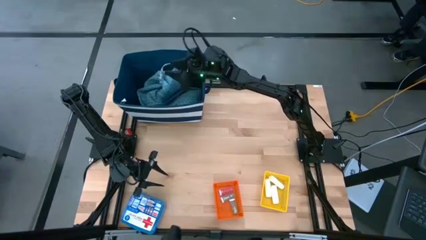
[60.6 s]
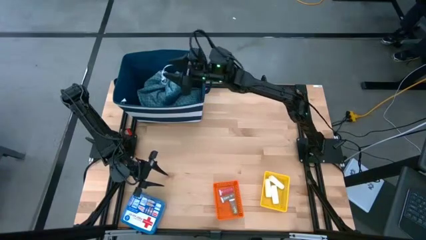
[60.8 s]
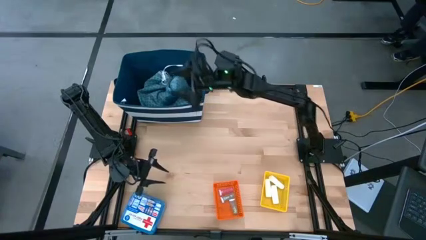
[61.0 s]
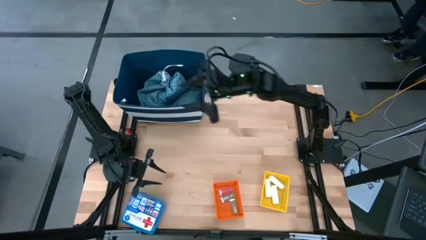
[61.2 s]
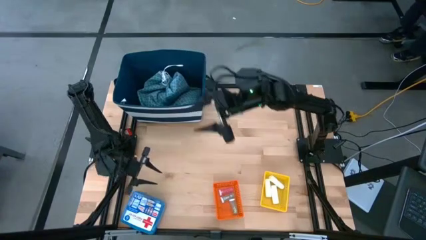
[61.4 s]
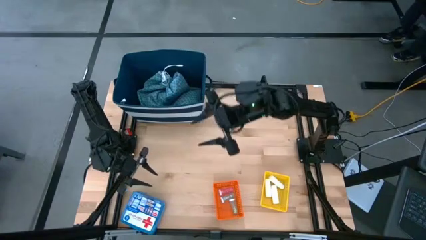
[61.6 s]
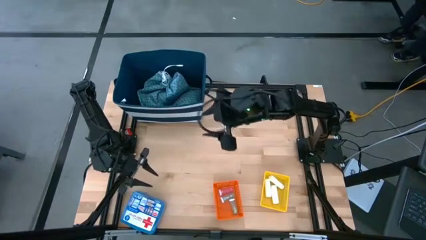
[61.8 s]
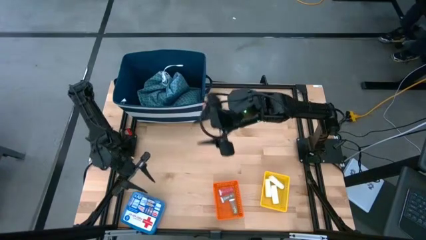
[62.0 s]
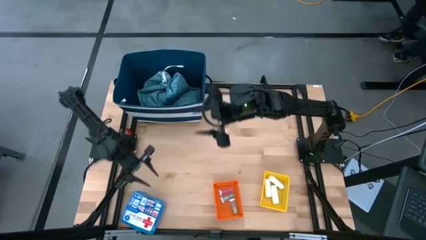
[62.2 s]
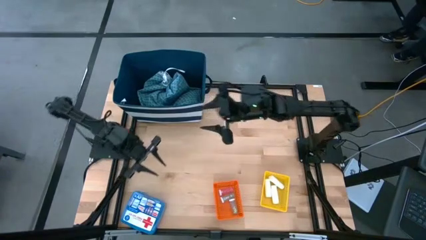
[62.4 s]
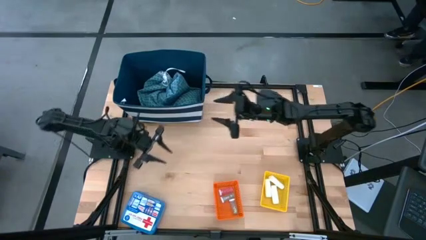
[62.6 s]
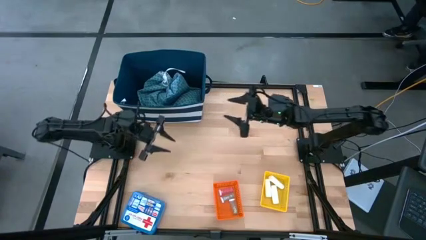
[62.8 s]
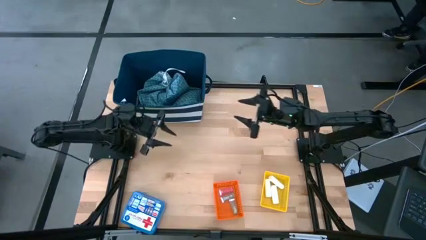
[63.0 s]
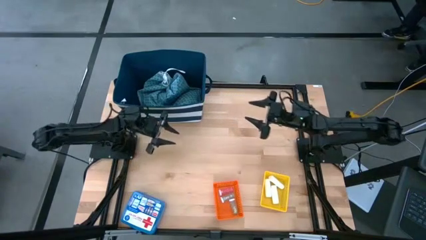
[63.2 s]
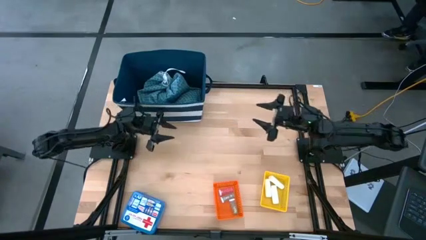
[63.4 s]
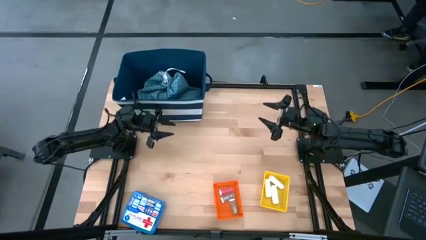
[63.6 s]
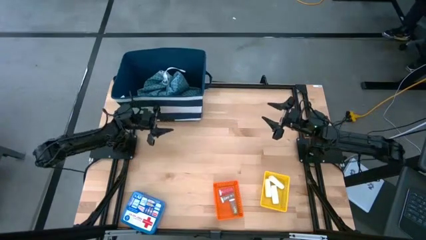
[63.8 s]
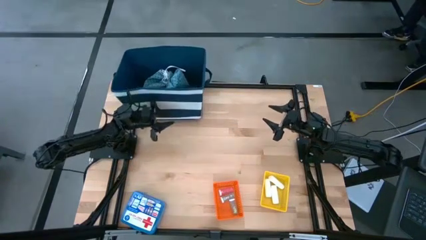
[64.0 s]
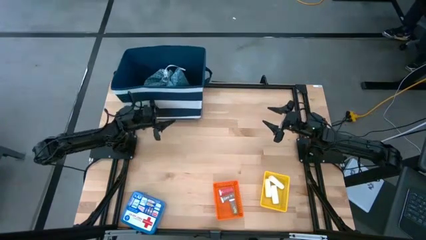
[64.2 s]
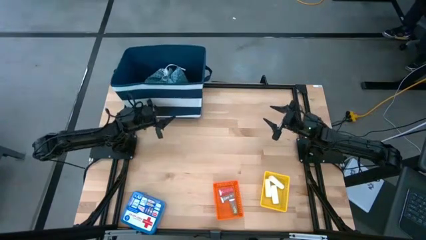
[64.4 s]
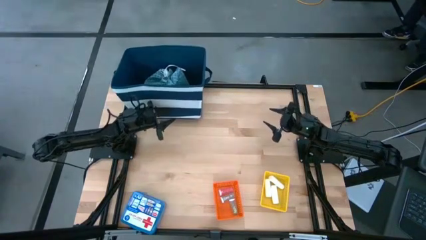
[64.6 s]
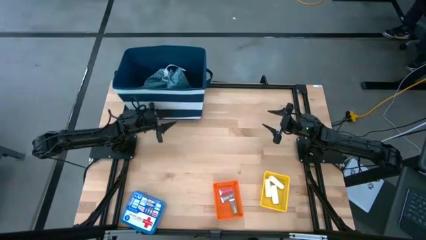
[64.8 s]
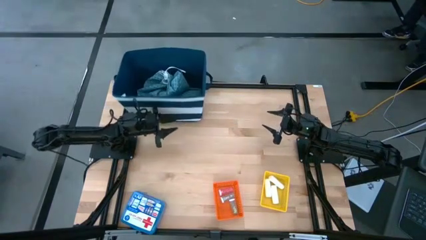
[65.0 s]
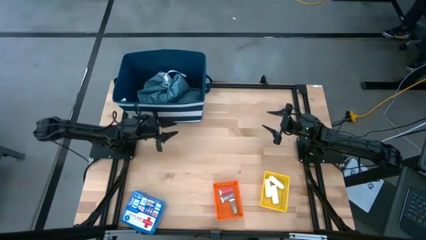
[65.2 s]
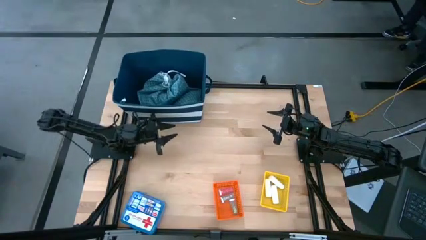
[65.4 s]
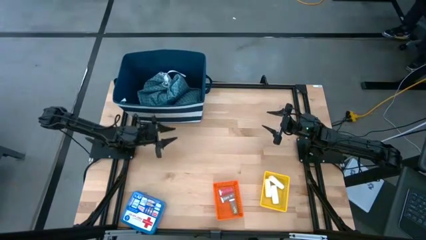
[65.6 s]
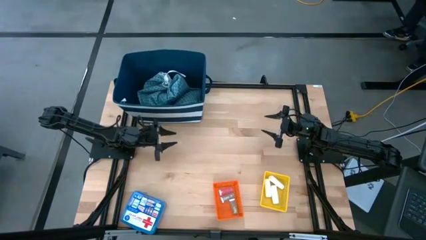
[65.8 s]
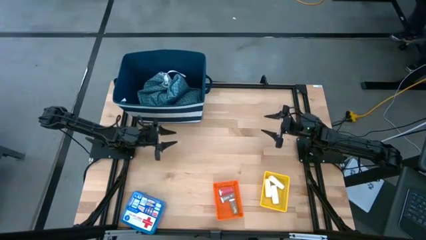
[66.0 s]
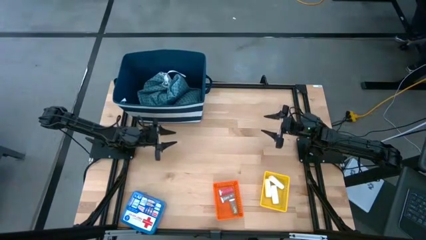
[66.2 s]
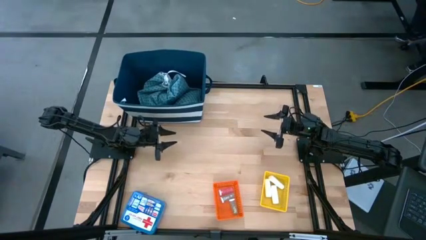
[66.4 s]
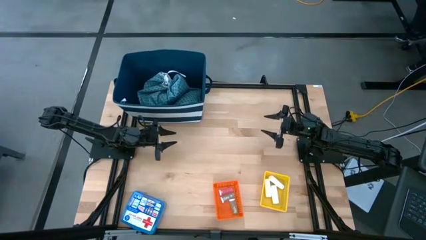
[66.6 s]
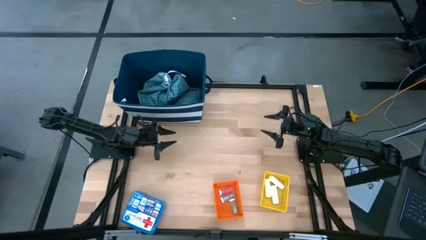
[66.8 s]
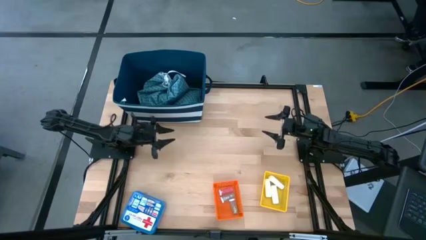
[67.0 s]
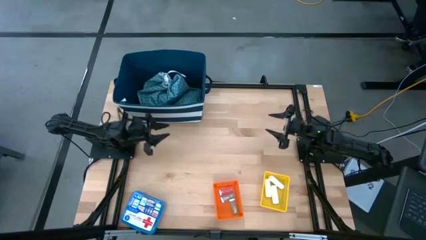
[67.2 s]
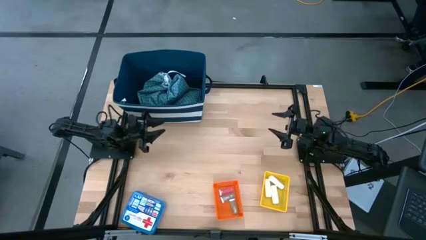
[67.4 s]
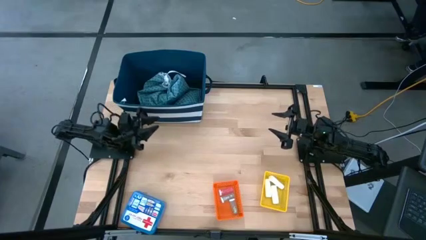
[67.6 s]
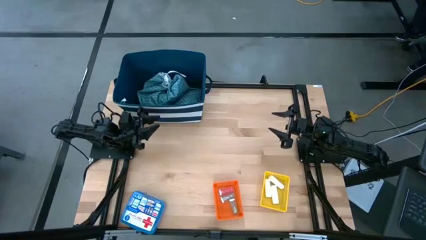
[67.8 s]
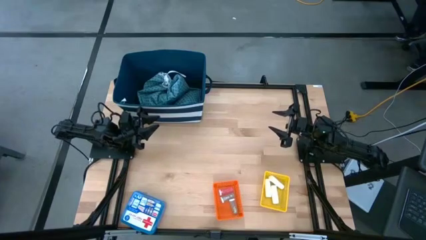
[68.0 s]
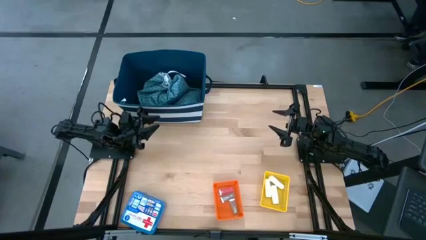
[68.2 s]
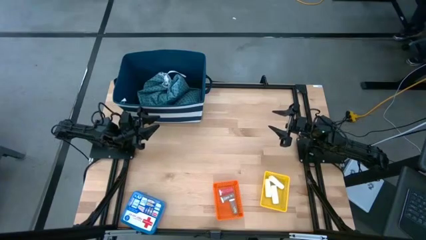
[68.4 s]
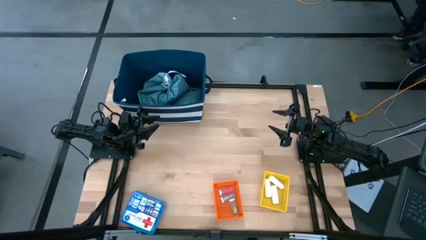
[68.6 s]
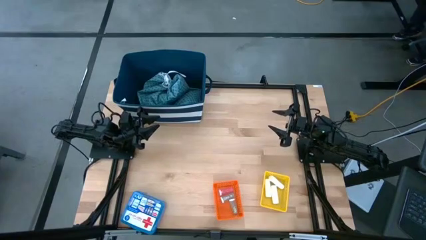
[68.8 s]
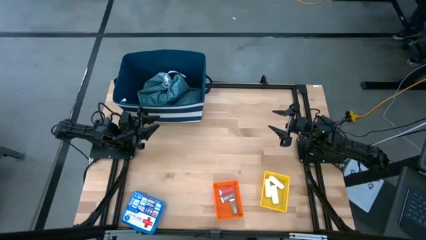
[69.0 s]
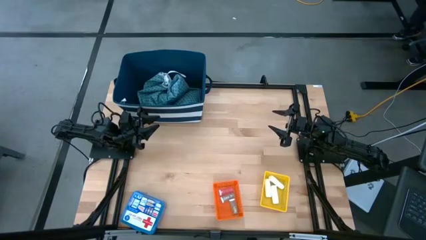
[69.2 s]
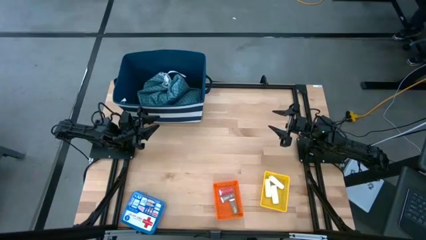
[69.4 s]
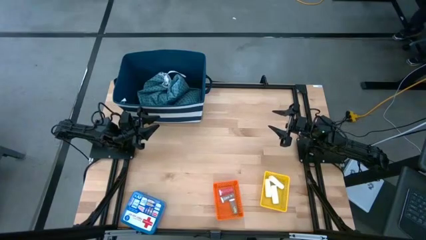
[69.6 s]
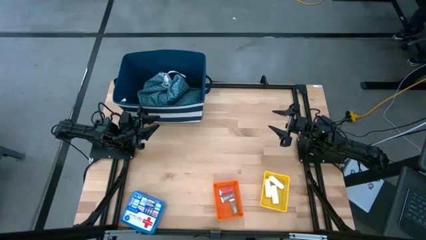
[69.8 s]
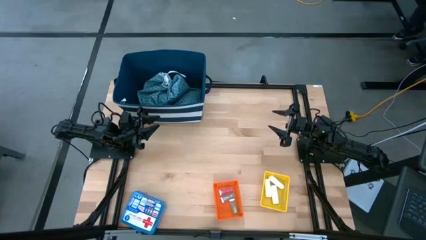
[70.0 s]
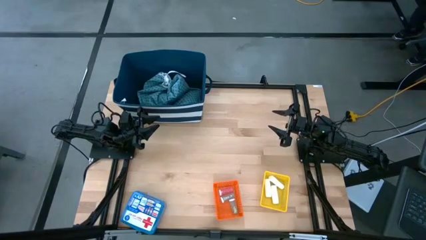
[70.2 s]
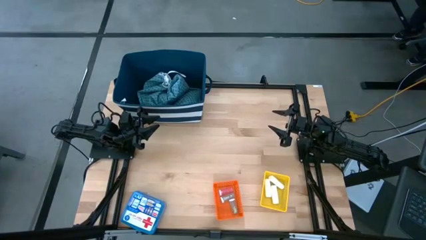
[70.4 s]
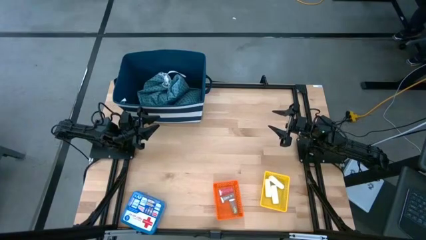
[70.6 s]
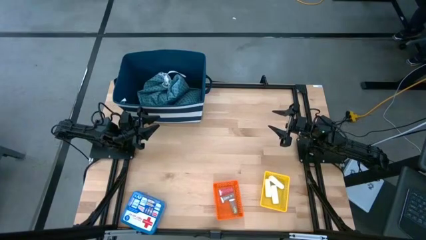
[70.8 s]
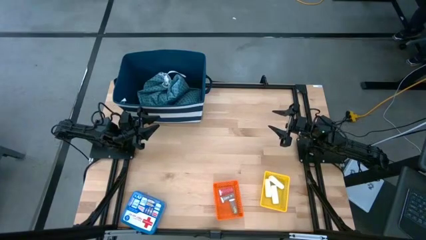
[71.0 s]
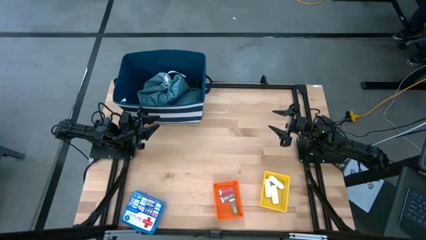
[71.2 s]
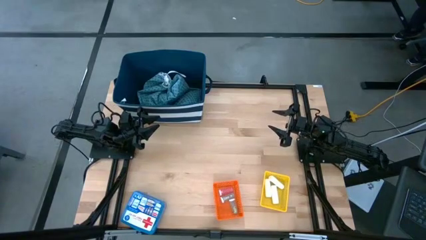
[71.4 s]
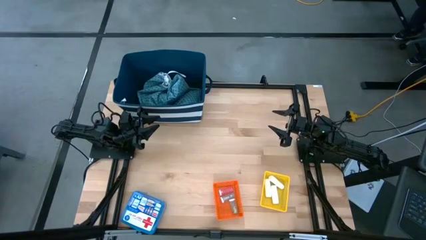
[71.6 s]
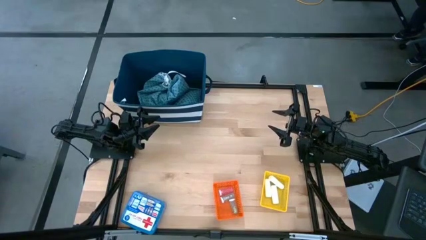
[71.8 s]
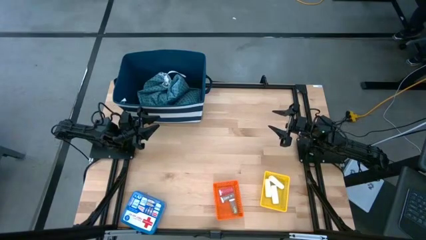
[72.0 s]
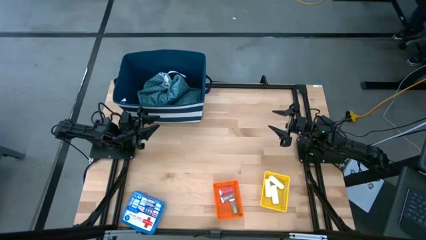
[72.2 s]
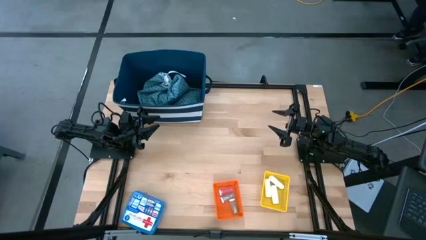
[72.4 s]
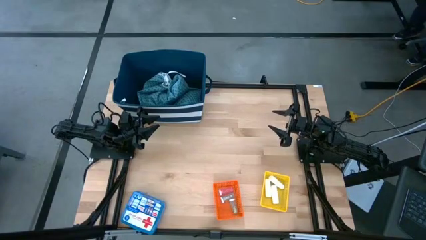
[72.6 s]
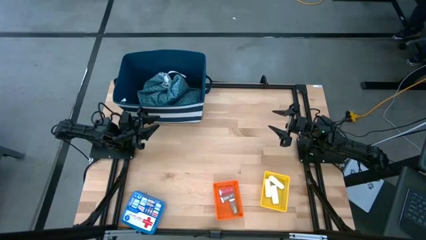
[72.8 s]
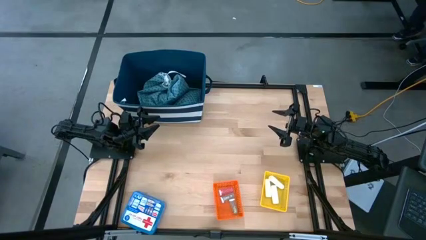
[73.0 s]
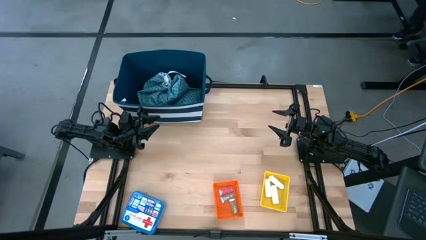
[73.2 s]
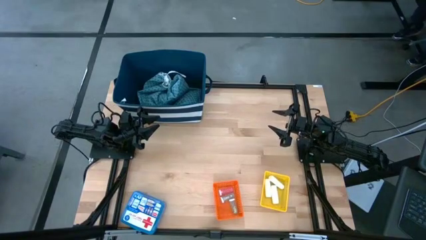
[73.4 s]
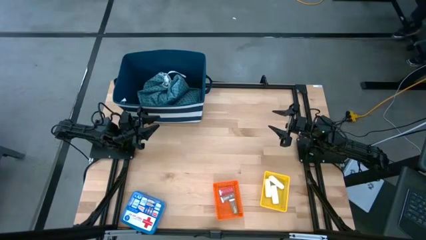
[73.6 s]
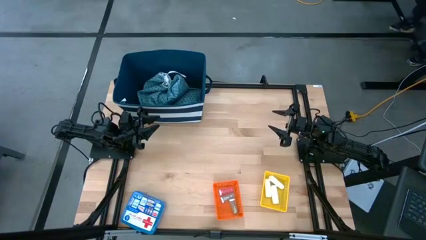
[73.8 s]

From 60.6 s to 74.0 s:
Task: Pick & Place Medicine items
Return to Home Position

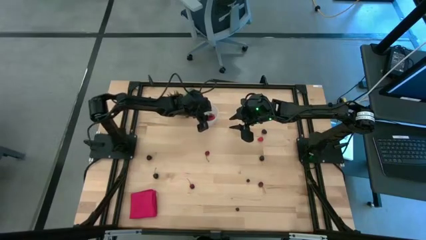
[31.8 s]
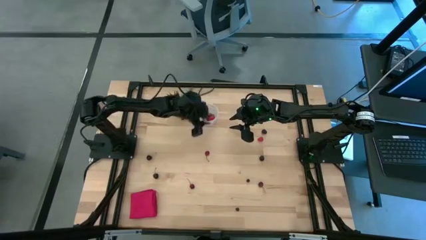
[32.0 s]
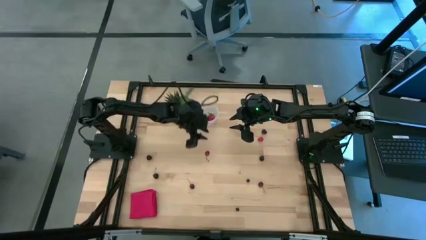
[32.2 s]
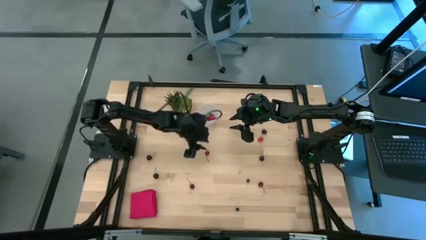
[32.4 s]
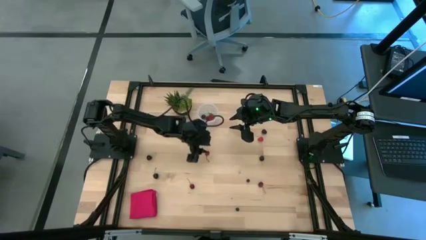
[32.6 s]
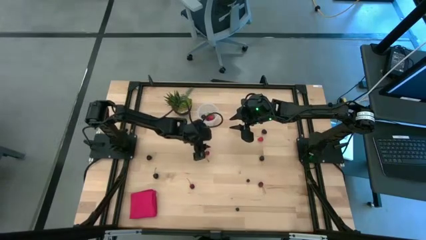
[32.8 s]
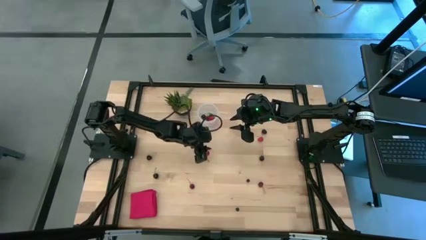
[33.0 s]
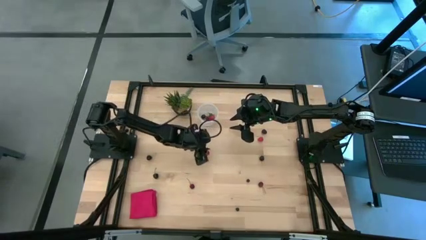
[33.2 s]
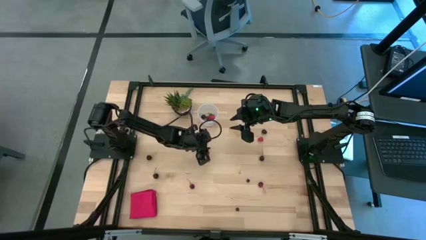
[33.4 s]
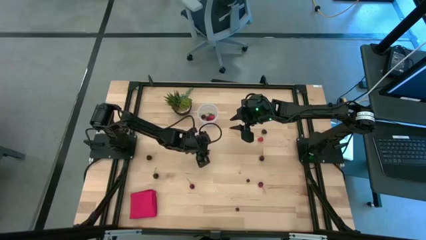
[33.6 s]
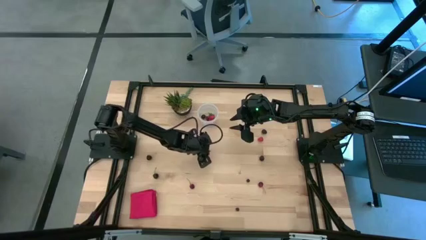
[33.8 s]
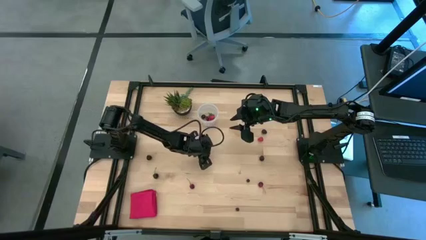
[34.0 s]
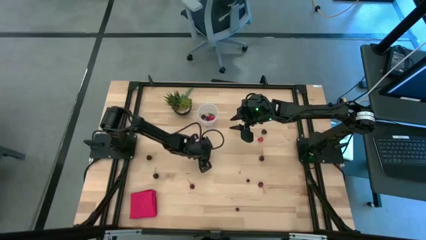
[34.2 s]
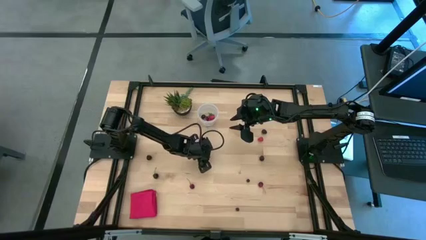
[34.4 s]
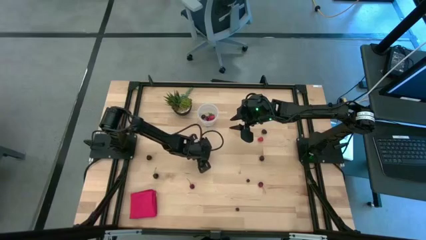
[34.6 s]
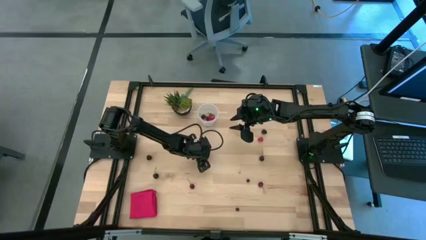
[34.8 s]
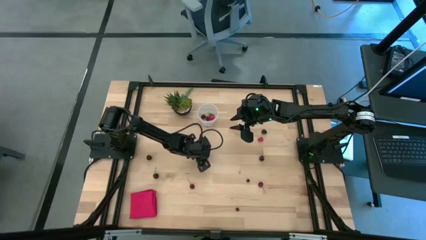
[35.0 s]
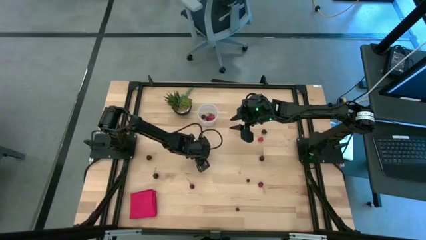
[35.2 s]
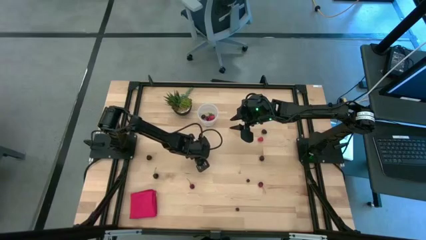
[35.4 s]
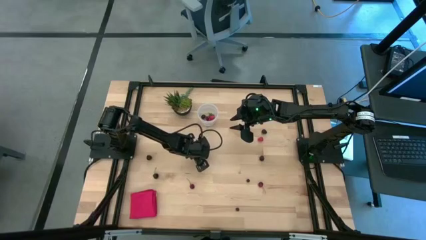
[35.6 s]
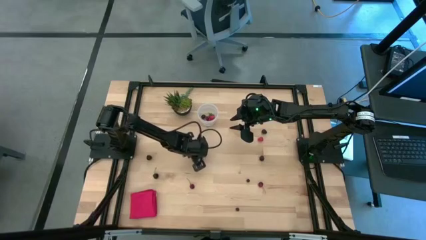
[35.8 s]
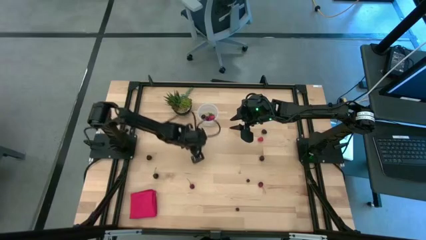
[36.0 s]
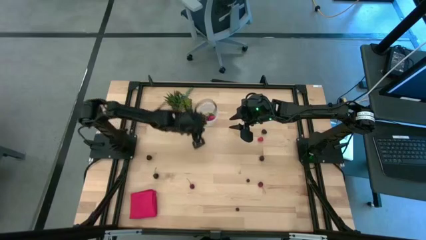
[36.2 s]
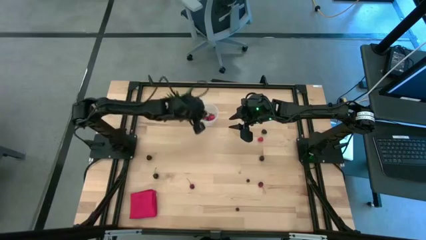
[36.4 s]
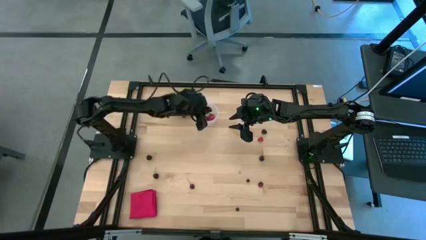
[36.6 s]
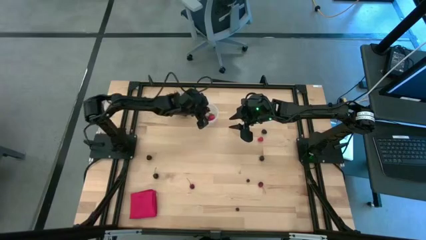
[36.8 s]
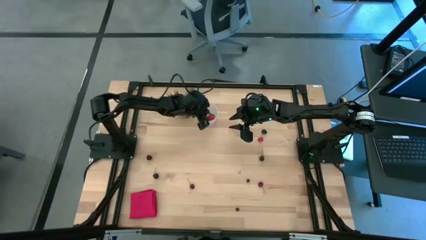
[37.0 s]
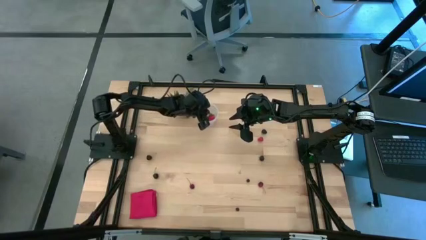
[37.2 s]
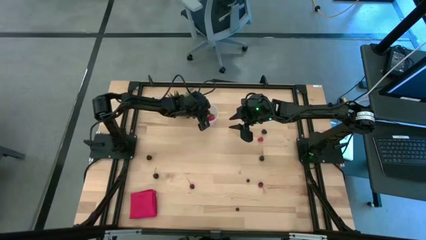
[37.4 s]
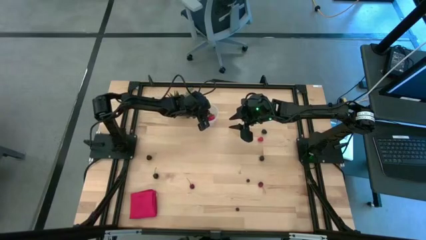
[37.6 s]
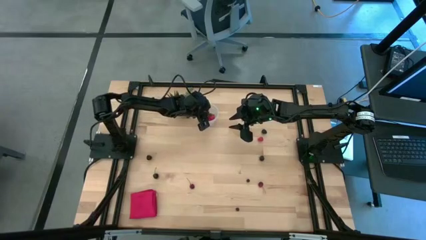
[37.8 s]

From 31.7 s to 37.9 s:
Task: Pick and placing Produce into tupperware
Put the red cherry into the transparent container
